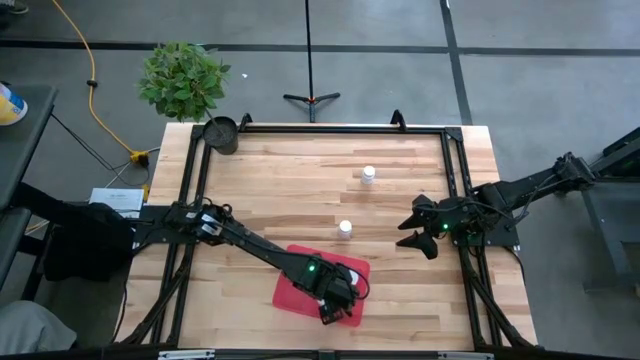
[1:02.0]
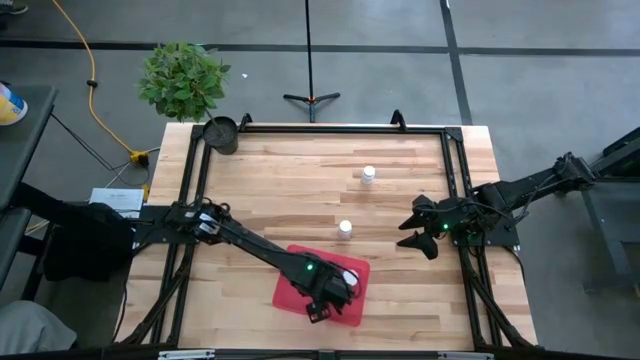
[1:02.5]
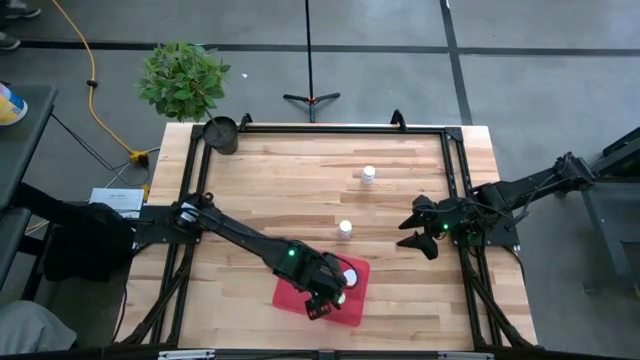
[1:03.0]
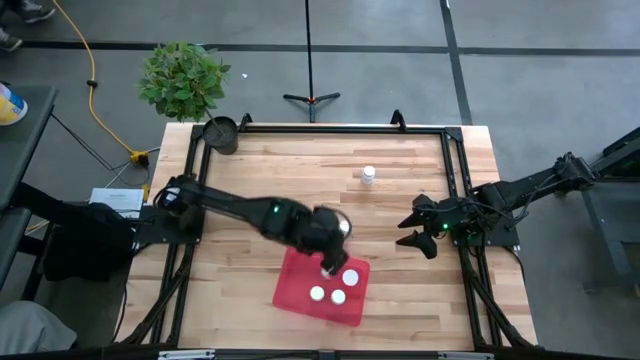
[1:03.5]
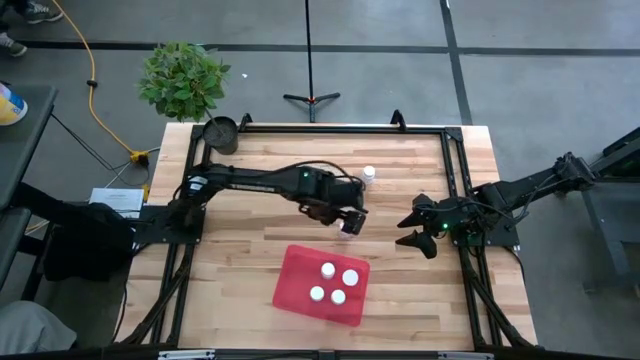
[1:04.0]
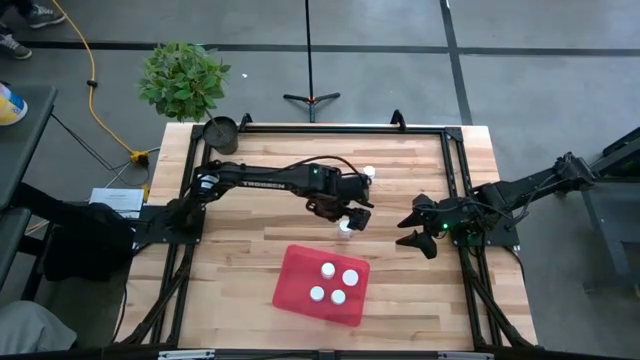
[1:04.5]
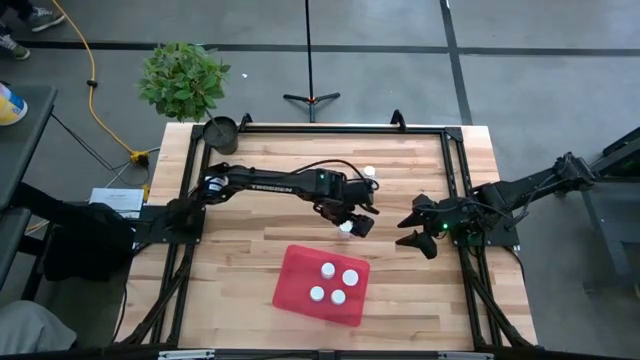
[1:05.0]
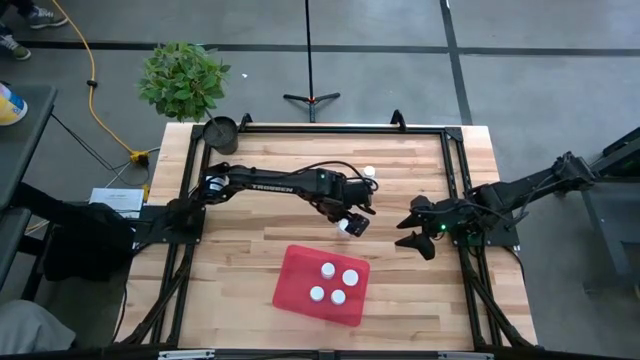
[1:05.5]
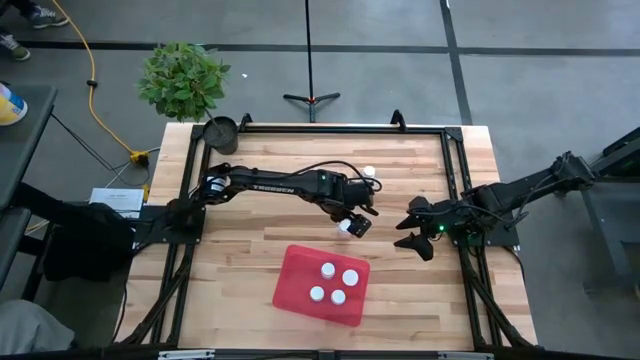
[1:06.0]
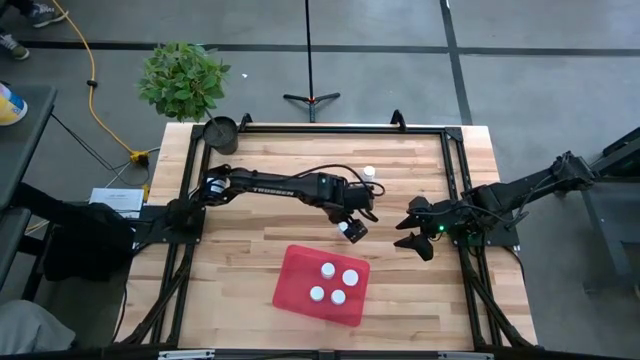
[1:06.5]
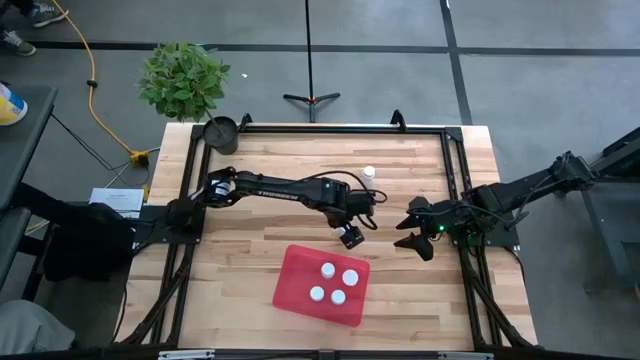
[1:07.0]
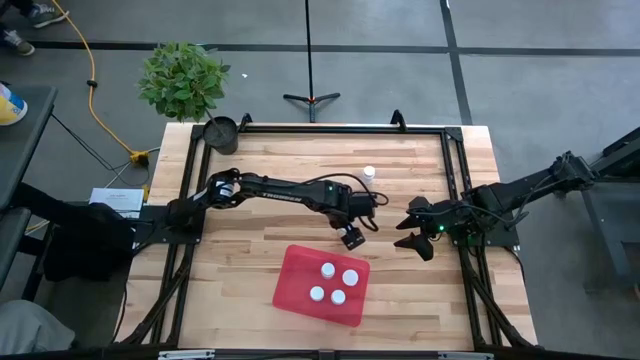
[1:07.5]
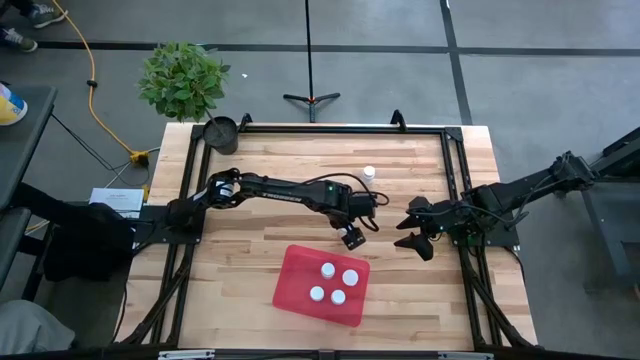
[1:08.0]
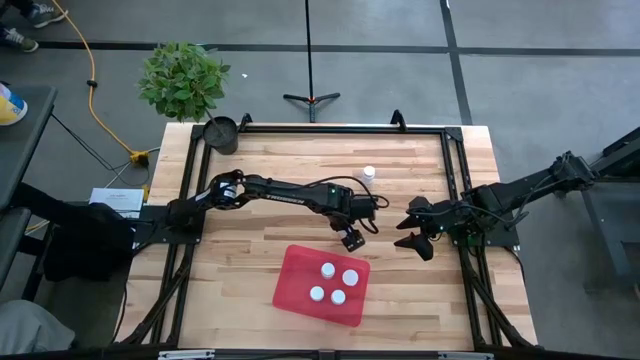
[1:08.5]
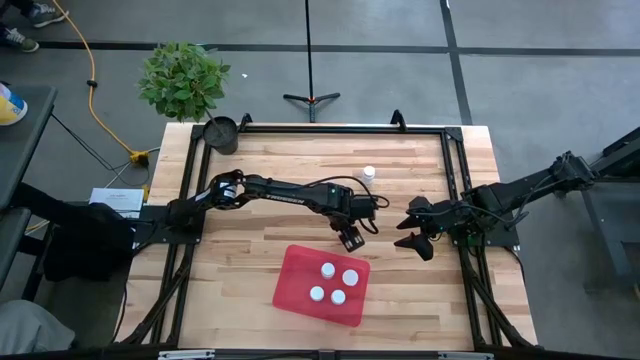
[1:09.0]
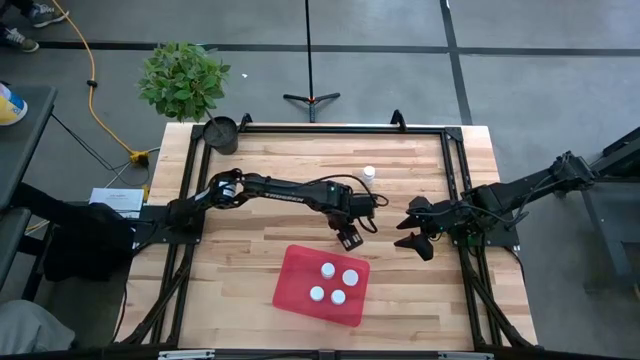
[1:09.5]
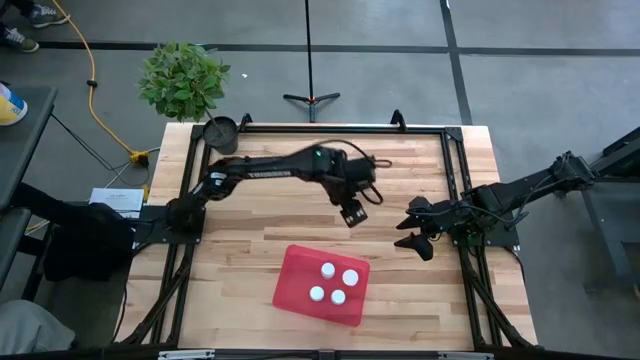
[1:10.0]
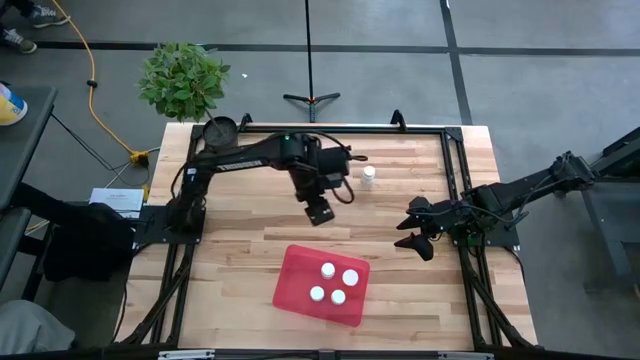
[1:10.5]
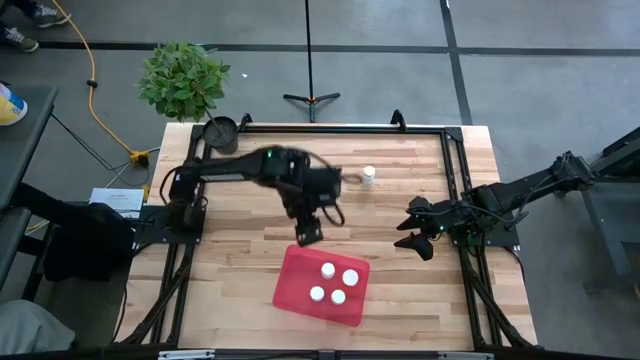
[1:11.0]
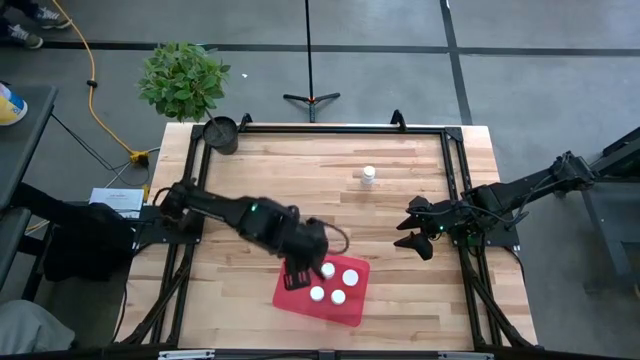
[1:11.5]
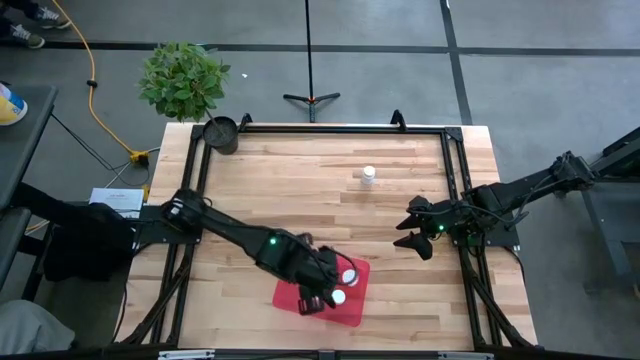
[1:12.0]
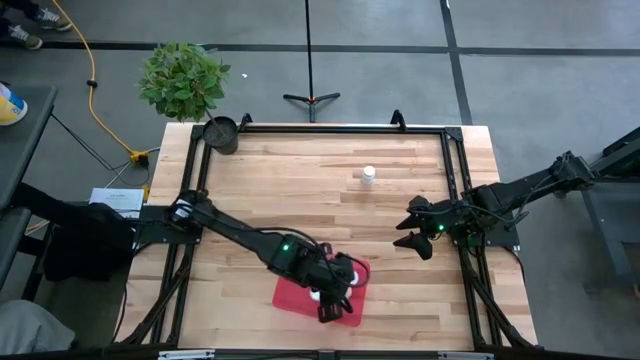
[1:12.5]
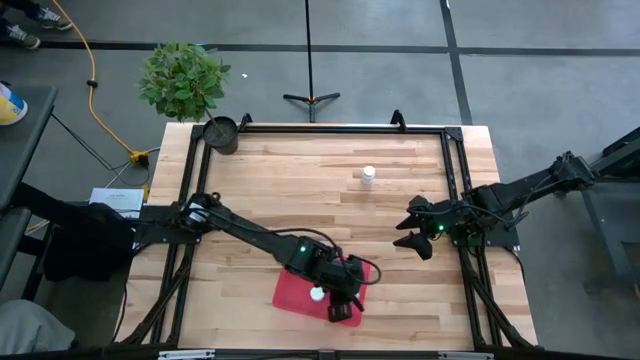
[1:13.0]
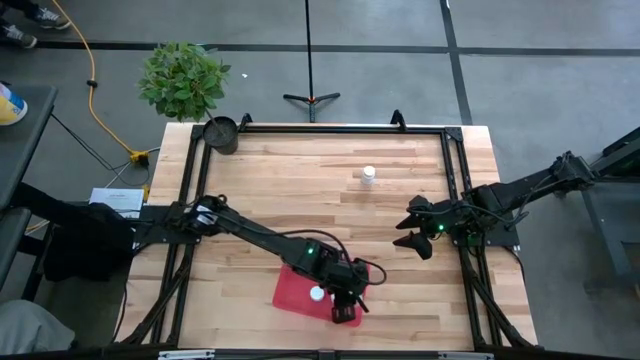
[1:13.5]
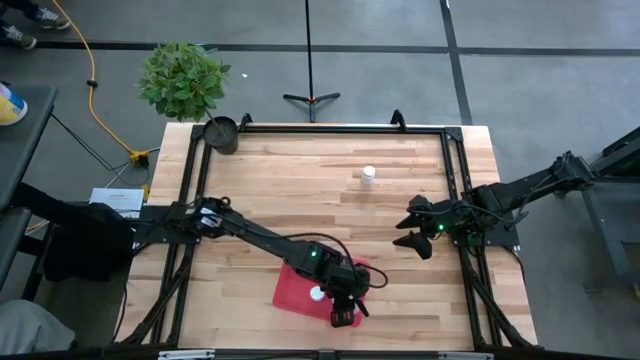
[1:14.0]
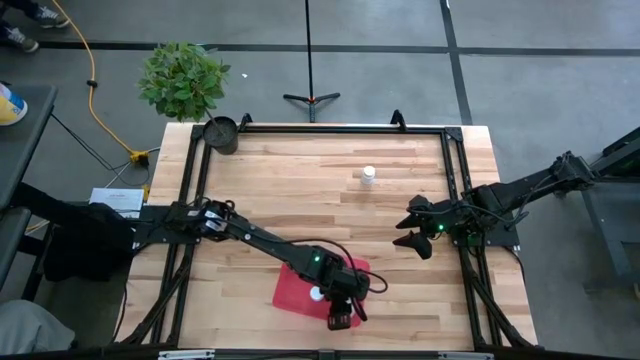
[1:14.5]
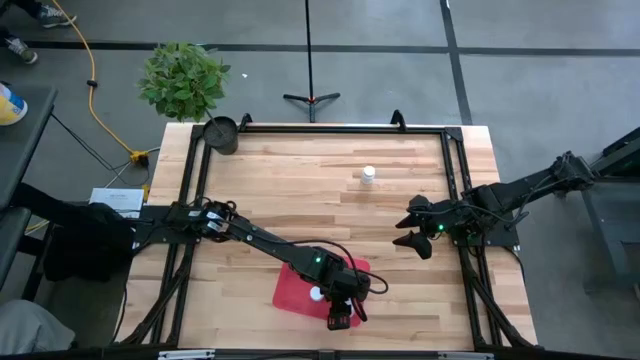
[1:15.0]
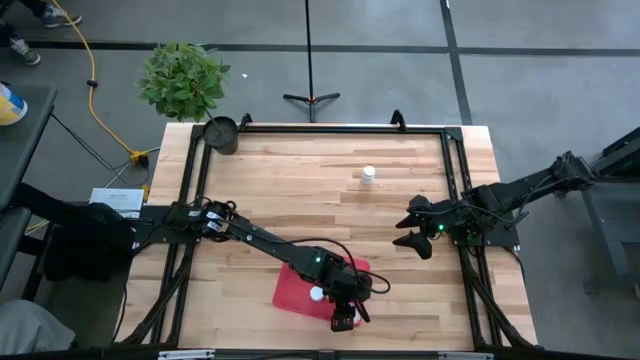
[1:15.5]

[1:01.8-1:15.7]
Task: Pick and place pill bottles into a basket
Put the white medicine bottle into the red container

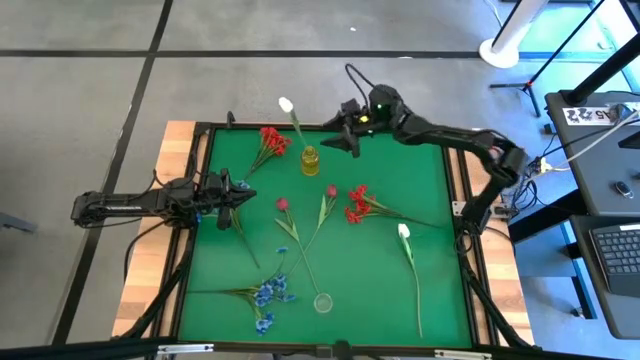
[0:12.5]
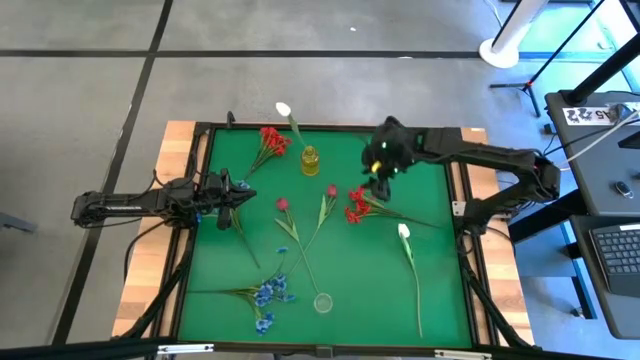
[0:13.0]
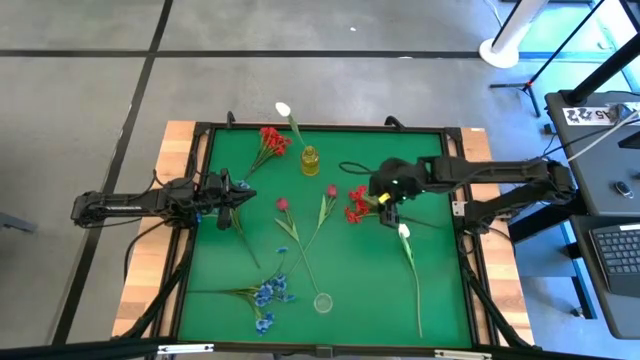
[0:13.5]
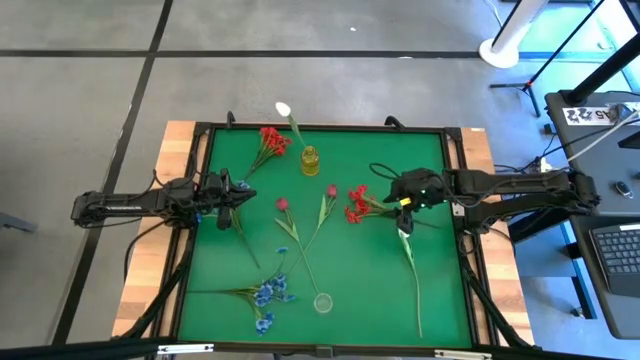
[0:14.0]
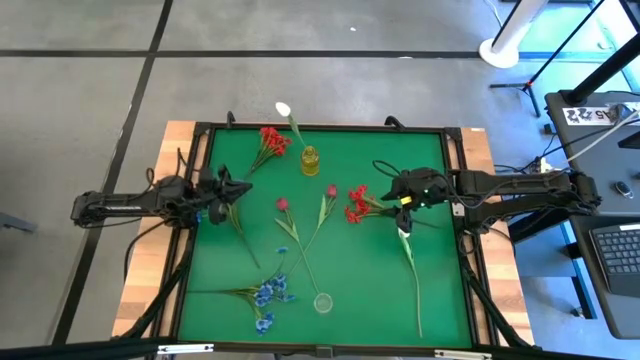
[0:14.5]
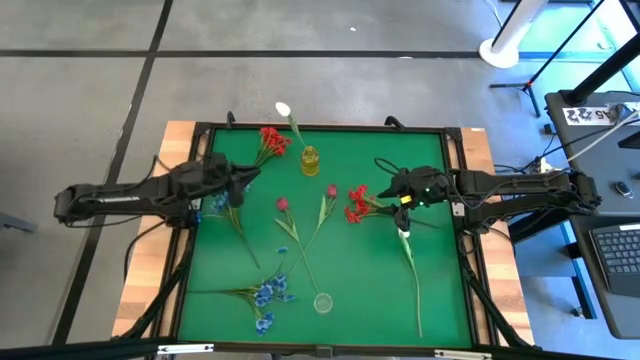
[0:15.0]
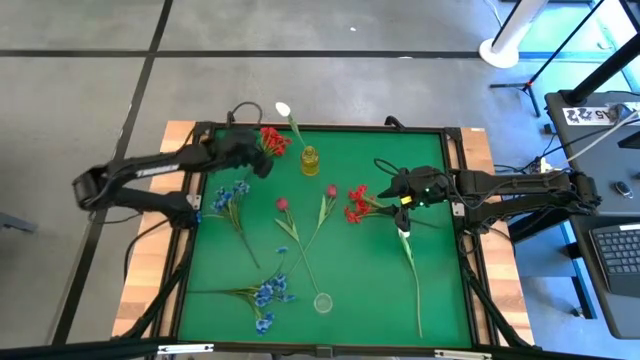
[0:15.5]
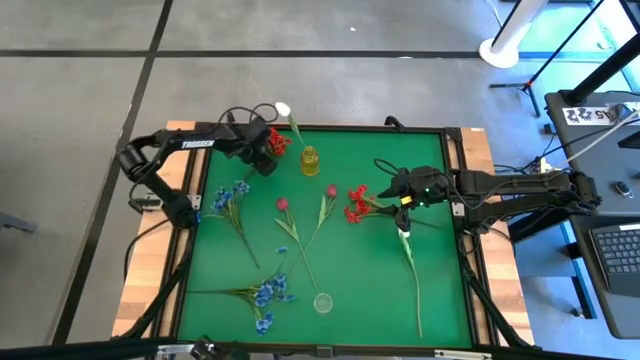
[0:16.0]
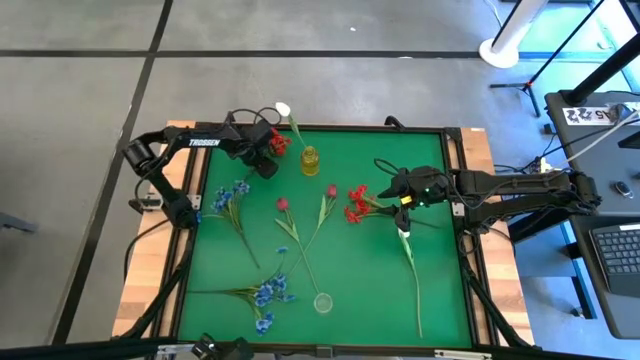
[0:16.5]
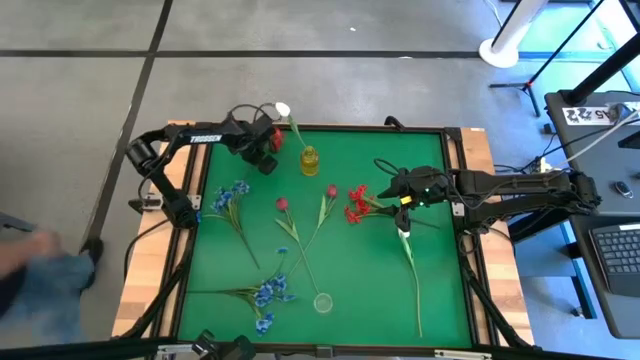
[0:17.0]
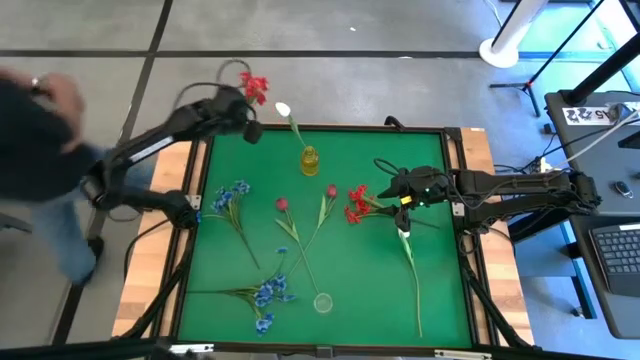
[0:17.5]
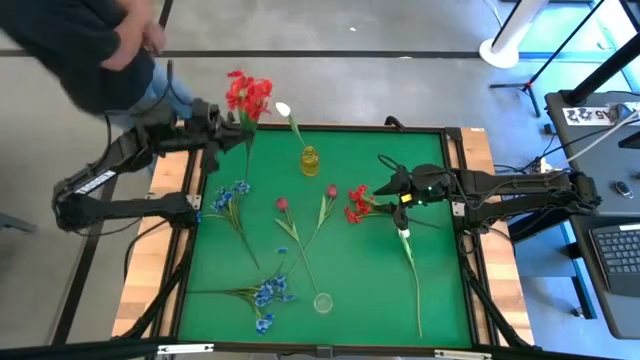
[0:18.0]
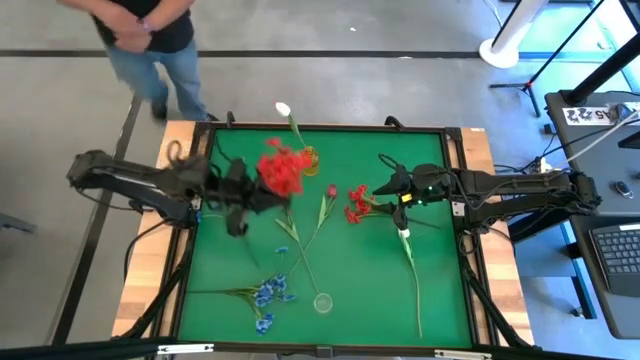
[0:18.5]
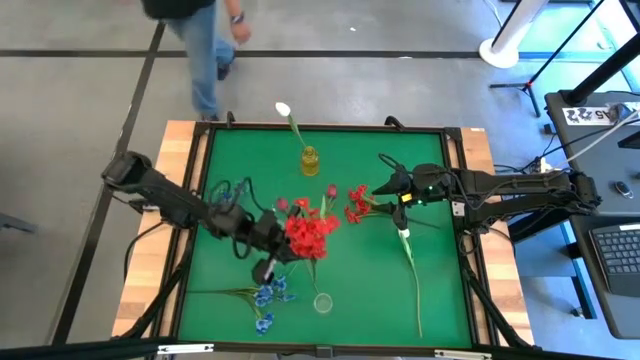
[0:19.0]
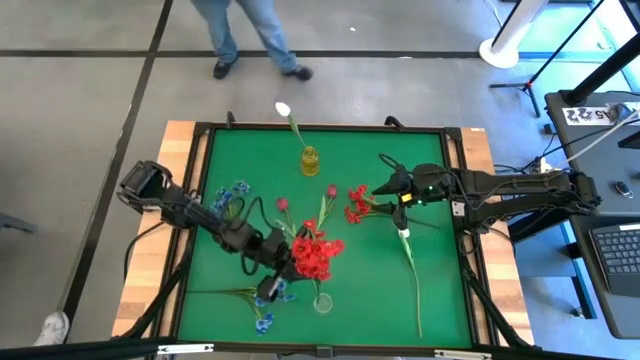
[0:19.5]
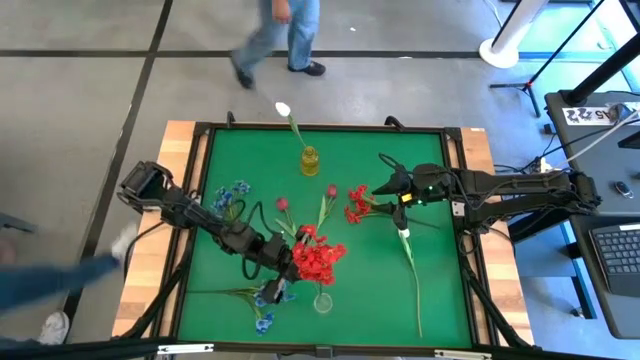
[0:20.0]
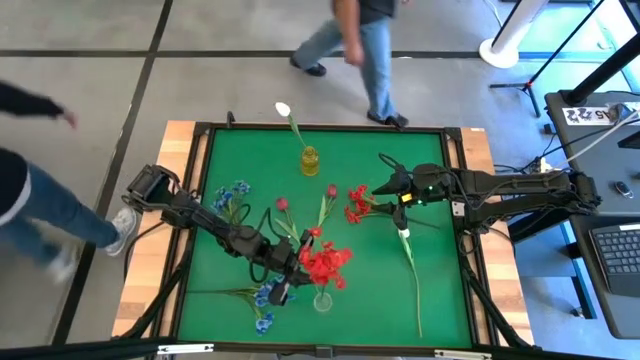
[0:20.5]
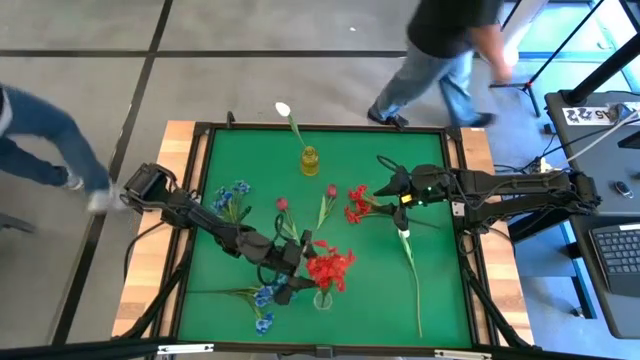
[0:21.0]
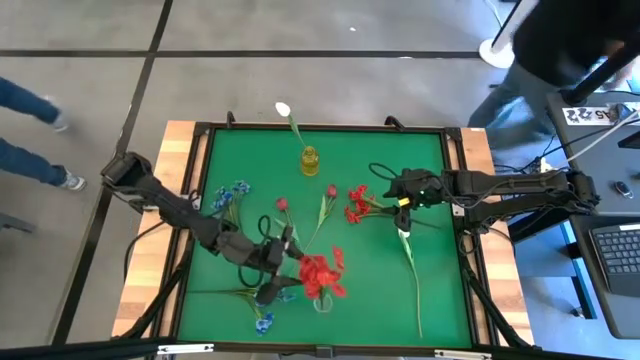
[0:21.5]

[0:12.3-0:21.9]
Task: Sort flowers into vase by color
Put the left orange flower into the transparent vase
